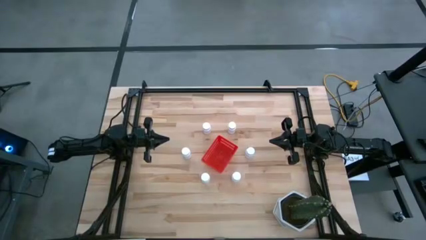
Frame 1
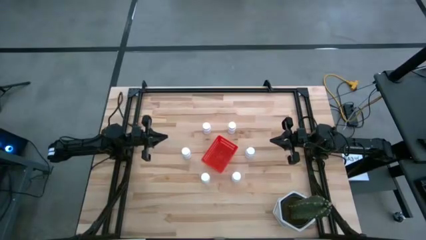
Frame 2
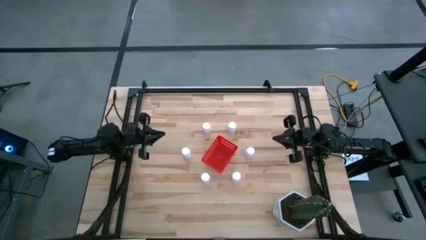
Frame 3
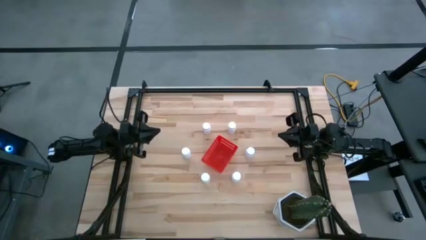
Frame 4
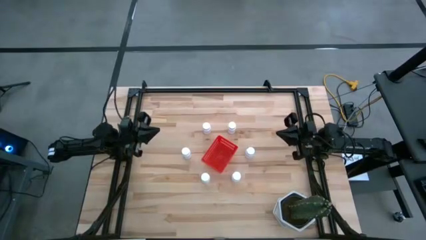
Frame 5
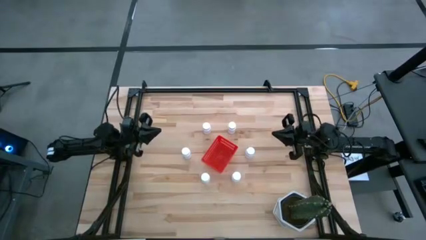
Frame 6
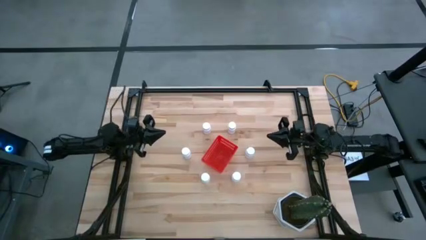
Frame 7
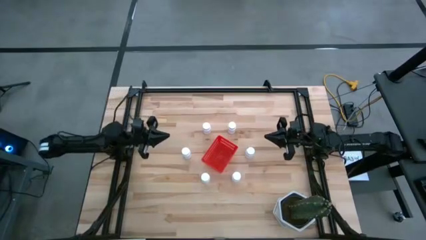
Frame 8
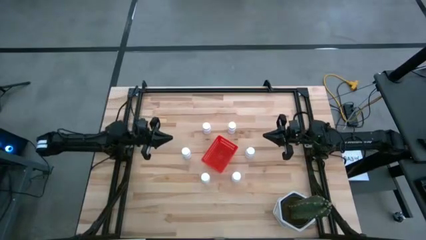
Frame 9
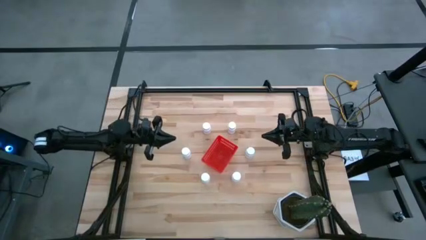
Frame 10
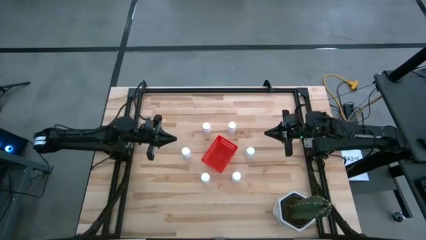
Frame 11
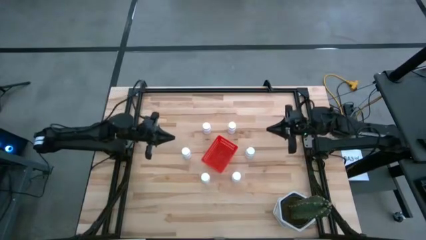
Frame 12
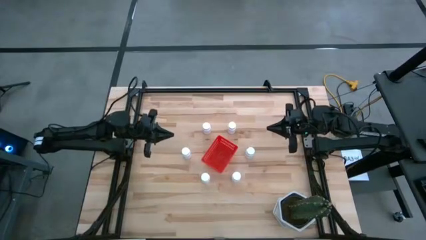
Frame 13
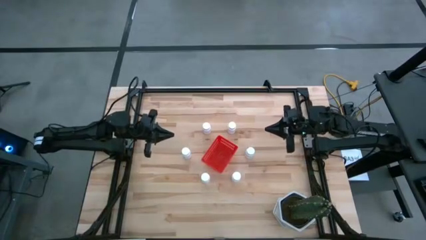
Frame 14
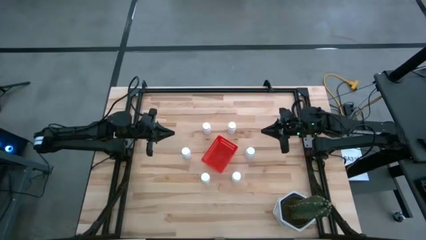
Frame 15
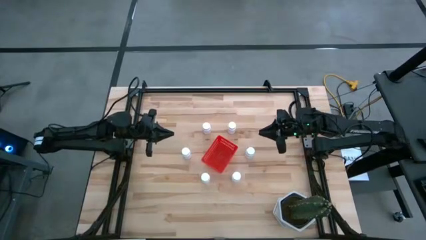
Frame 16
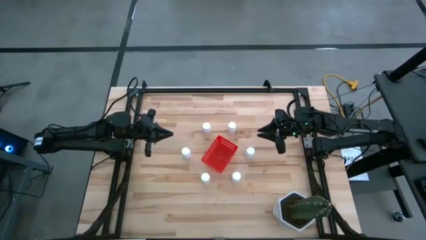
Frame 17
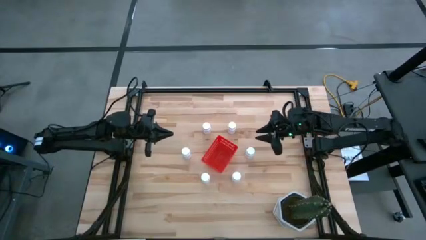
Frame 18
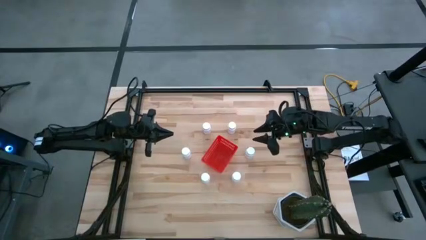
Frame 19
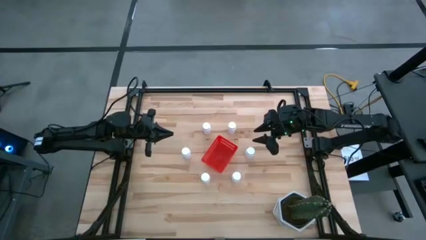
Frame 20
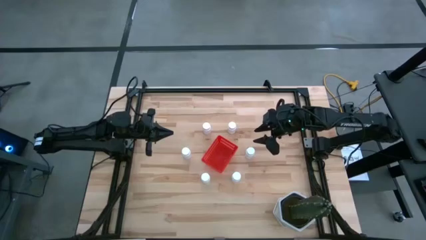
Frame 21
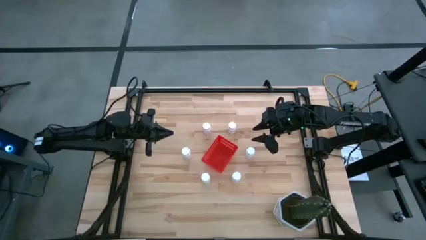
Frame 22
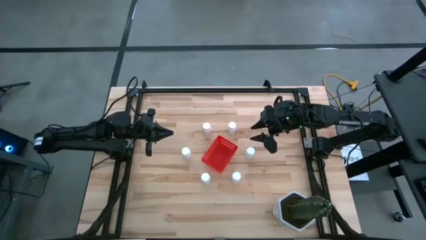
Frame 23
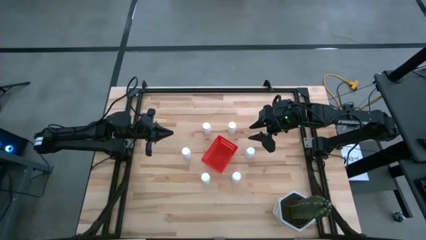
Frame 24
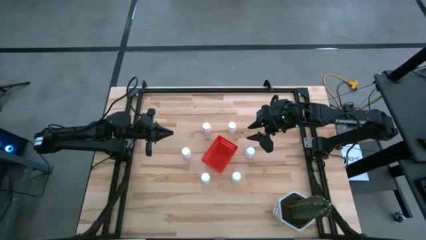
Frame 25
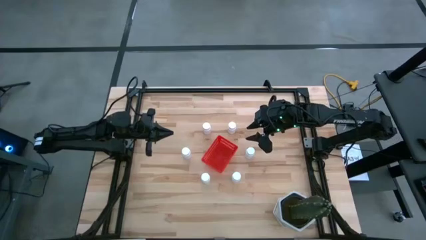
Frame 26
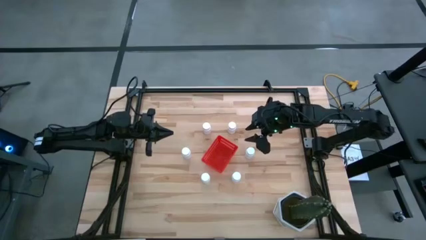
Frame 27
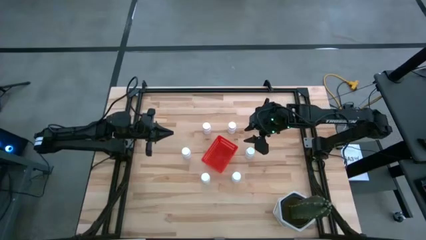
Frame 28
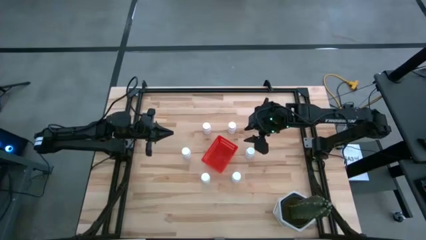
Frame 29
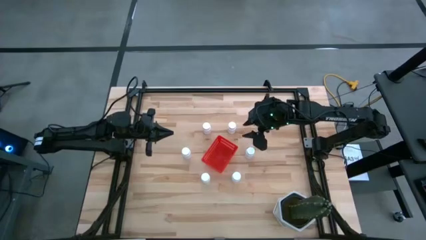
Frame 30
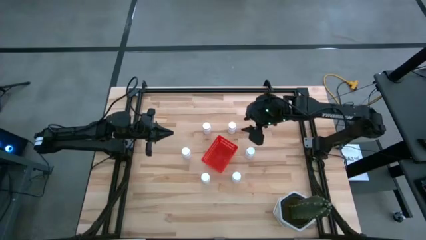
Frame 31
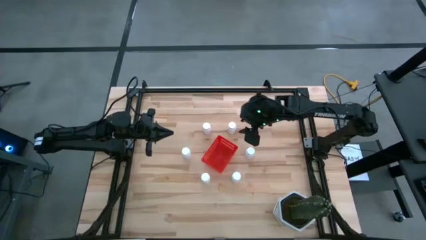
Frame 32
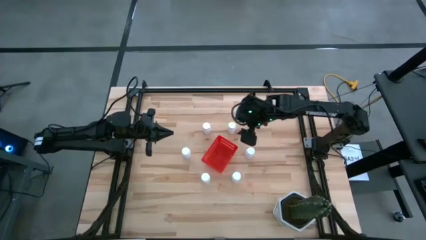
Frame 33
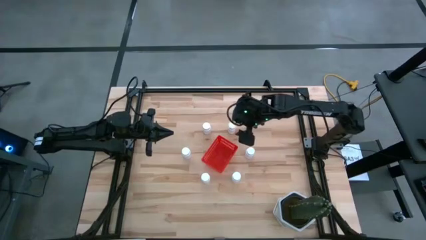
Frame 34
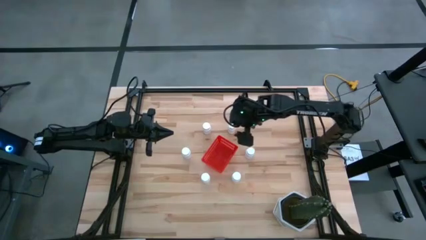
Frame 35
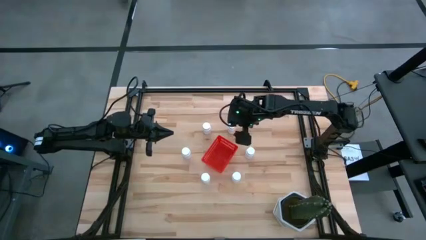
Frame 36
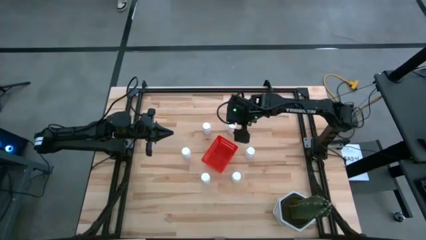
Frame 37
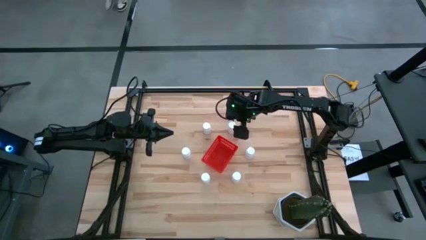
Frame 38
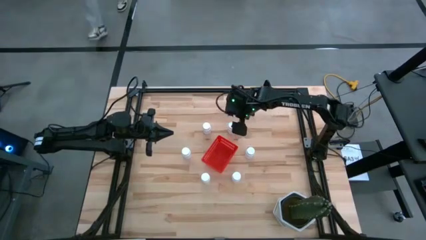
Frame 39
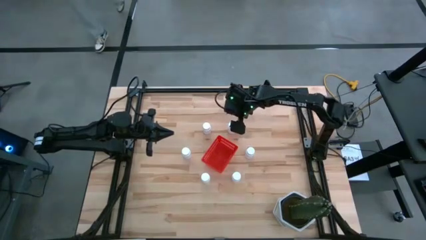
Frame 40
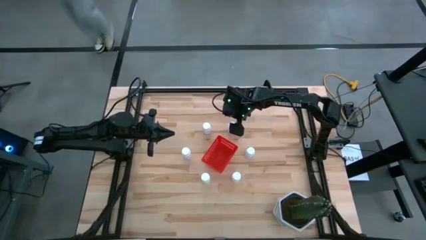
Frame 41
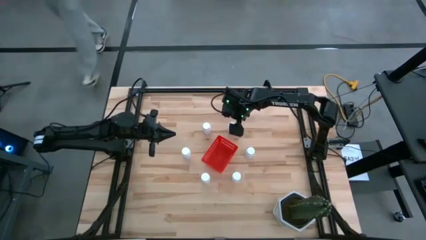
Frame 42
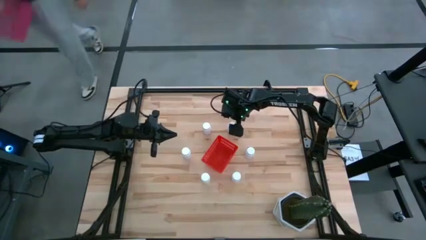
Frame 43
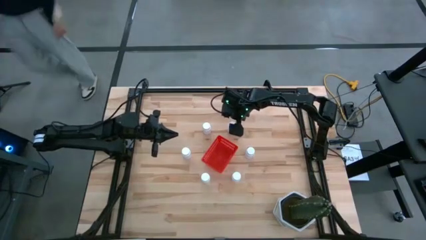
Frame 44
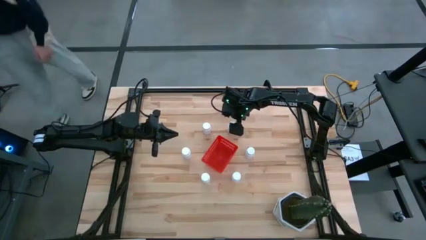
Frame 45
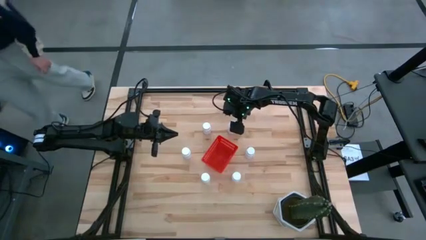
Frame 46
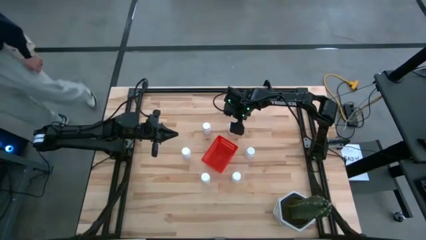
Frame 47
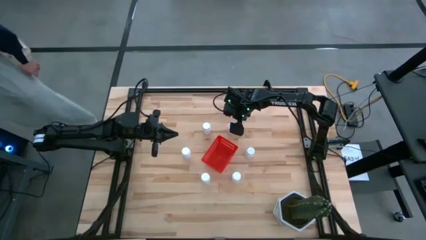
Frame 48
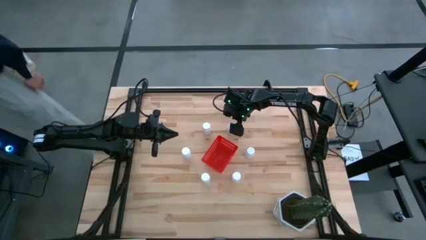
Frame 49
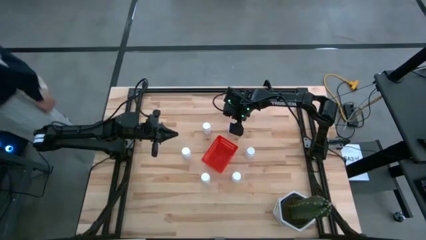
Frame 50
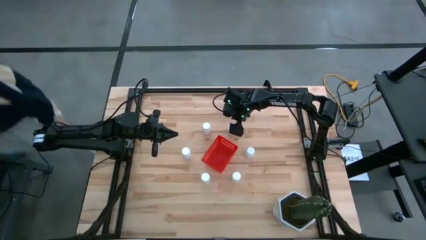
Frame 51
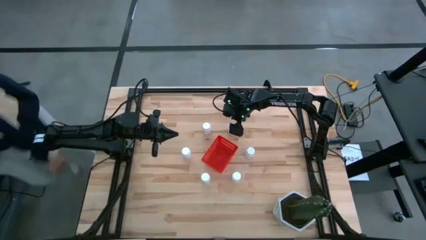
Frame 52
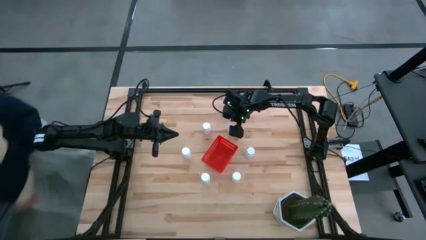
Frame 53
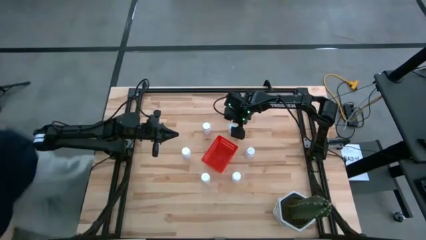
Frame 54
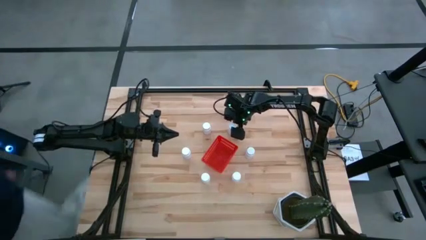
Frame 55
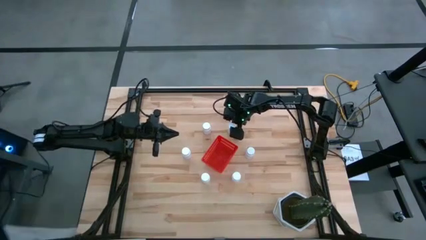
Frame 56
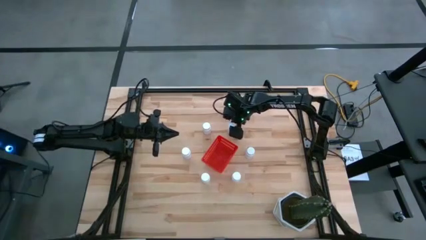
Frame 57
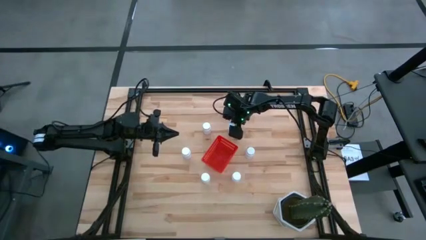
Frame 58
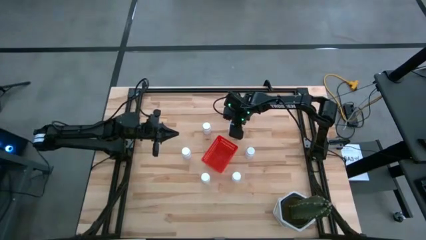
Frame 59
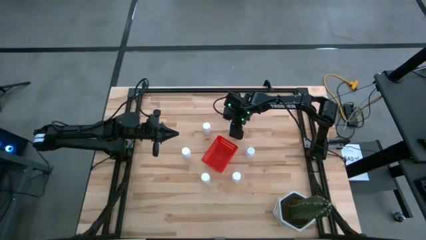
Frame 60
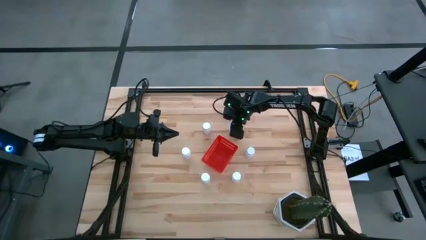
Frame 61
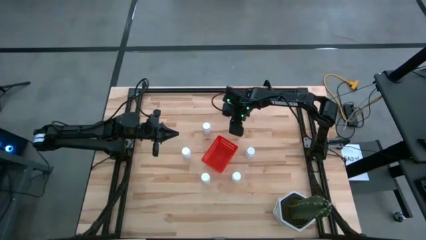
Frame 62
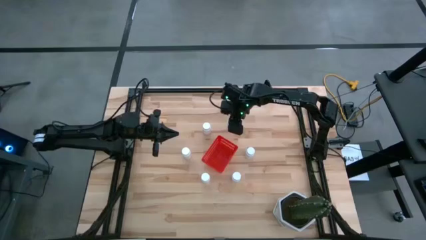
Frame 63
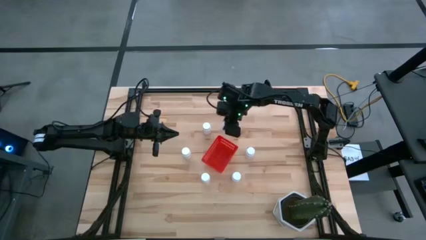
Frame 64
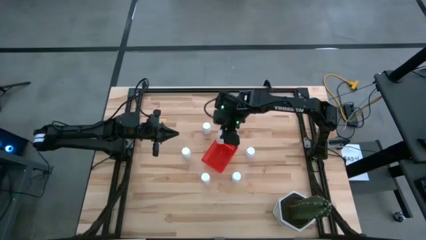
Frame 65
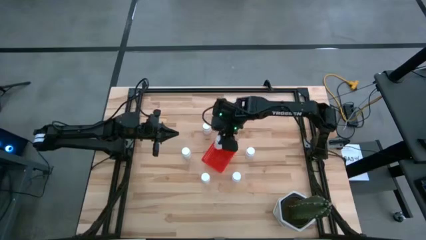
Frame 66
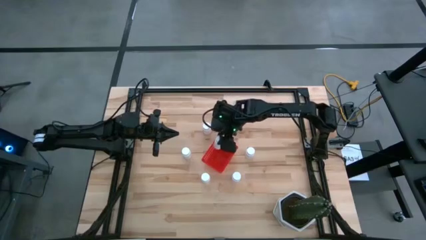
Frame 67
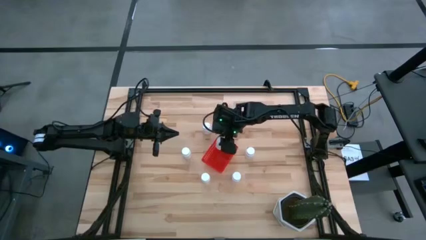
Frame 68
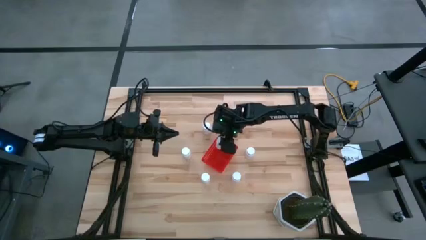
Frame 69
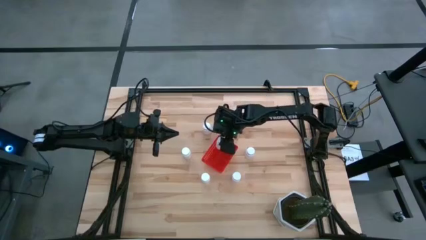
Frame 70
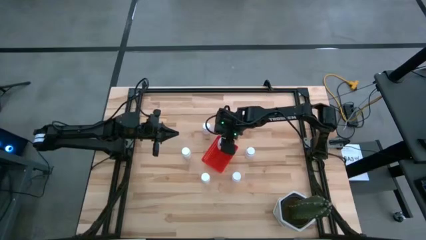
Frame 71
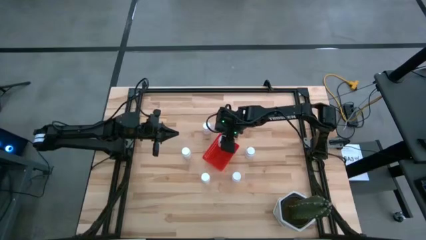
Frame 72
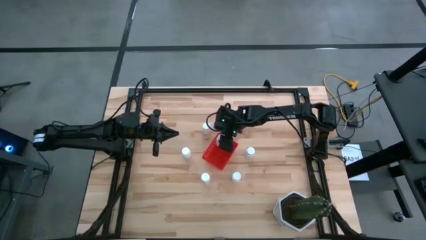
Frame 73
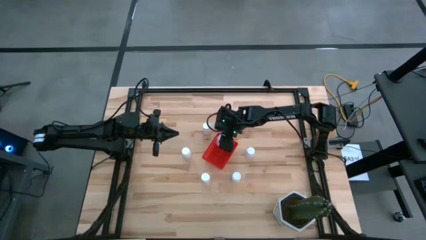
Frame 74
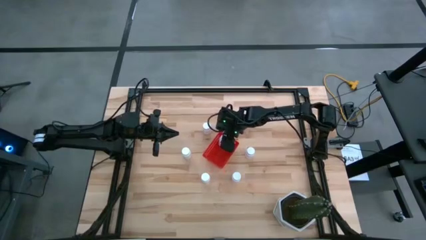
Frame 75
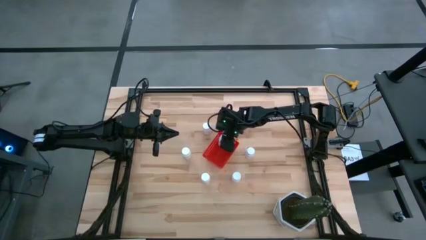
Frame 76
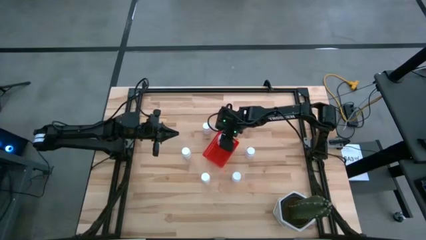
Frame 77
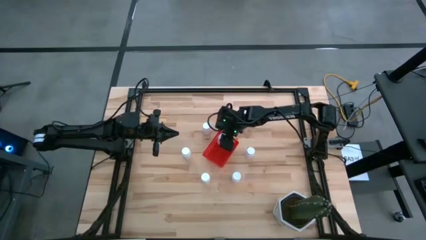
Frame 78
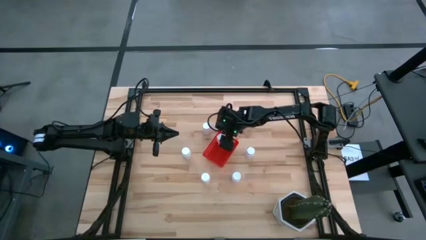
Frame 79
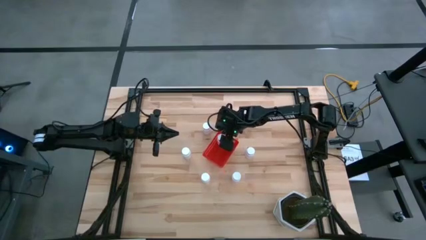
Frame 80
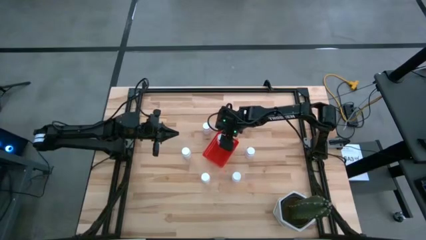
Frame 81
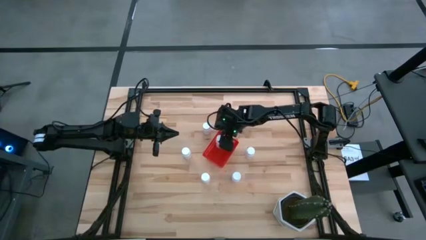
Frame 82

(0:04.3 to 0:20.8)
Task: Pick and place pill bottles into a basket
Put the white pill bottle into the red basket
